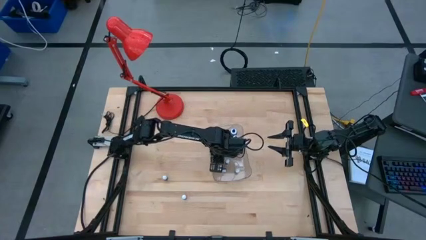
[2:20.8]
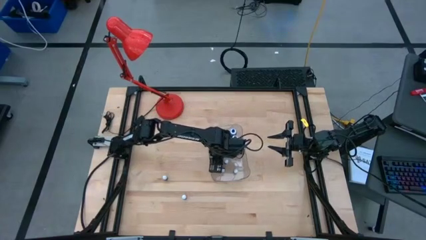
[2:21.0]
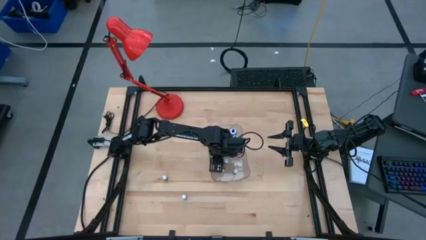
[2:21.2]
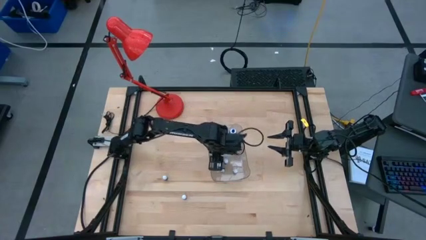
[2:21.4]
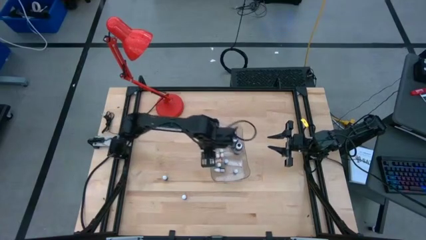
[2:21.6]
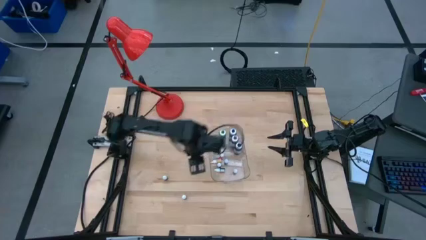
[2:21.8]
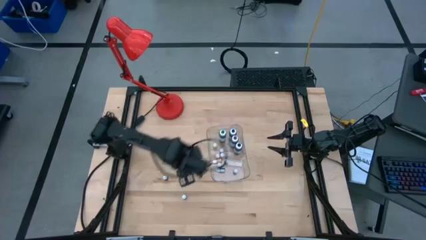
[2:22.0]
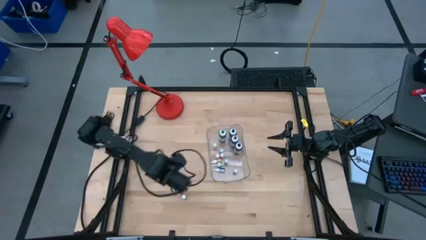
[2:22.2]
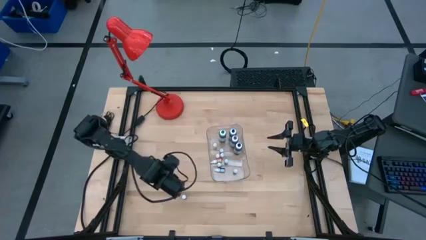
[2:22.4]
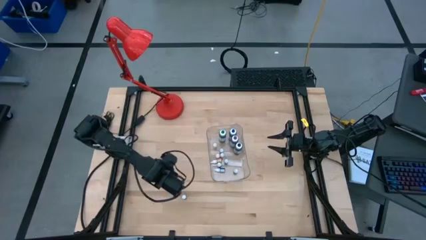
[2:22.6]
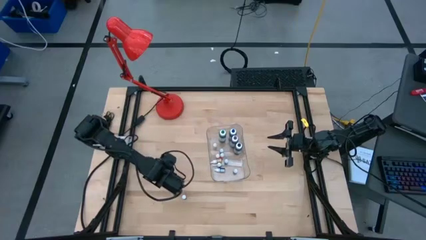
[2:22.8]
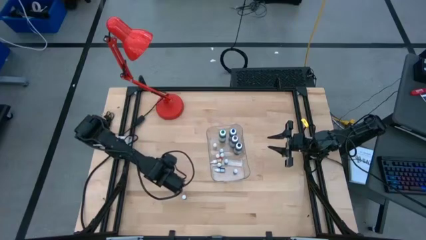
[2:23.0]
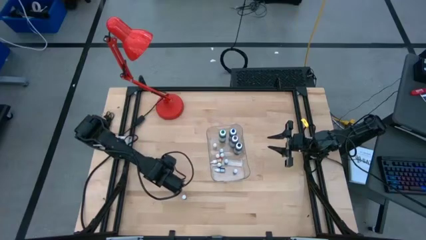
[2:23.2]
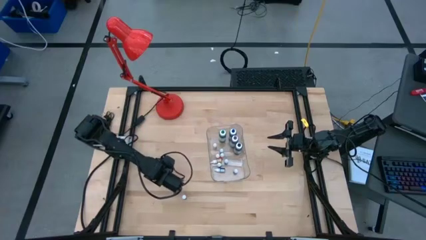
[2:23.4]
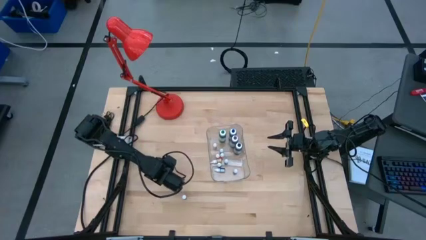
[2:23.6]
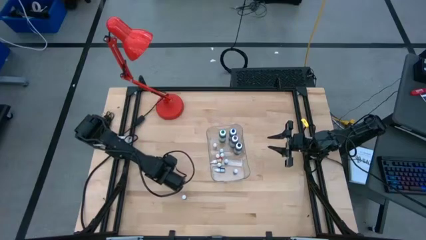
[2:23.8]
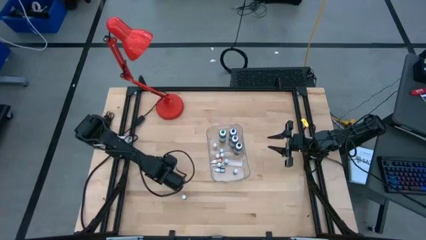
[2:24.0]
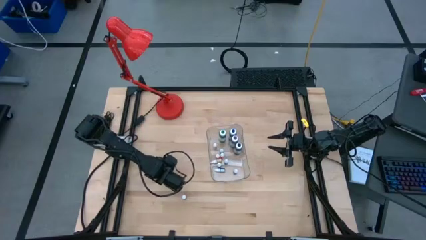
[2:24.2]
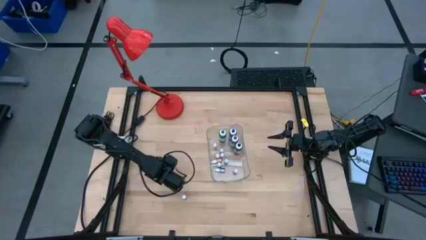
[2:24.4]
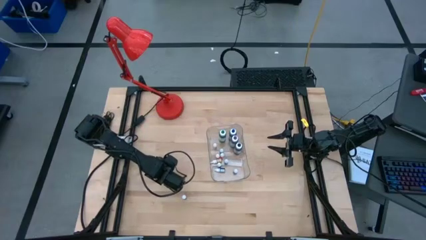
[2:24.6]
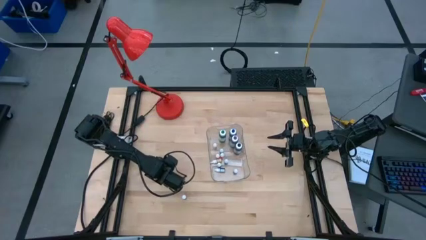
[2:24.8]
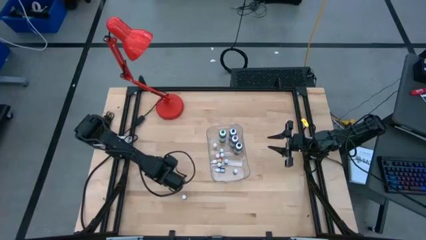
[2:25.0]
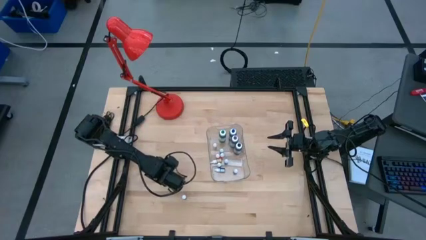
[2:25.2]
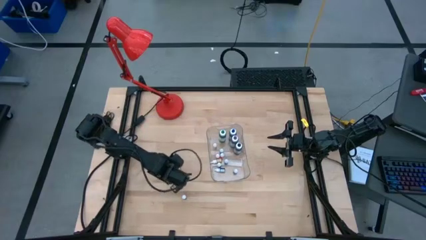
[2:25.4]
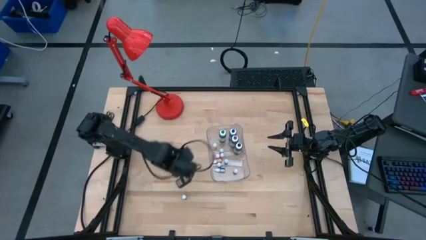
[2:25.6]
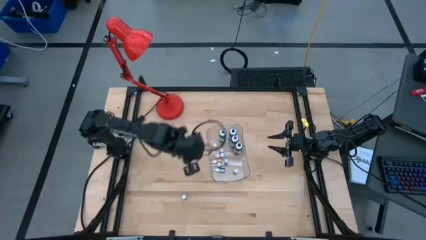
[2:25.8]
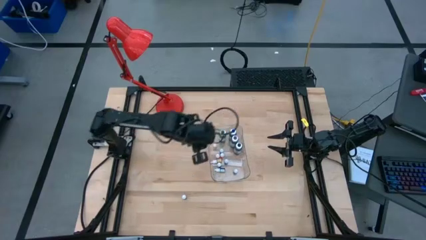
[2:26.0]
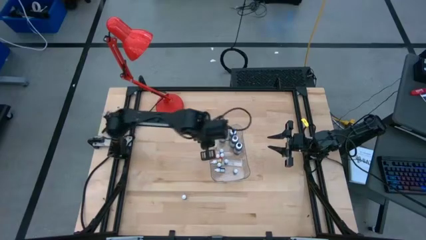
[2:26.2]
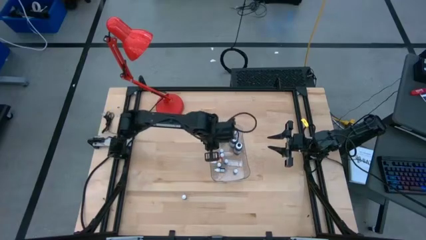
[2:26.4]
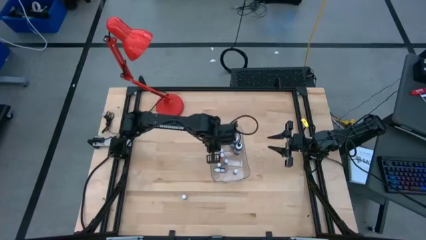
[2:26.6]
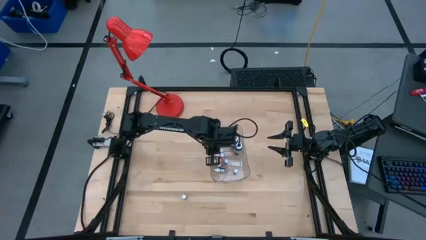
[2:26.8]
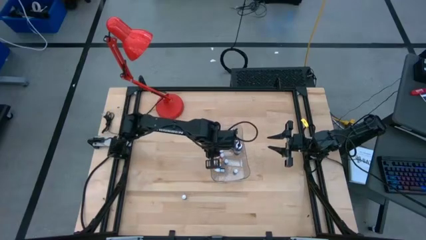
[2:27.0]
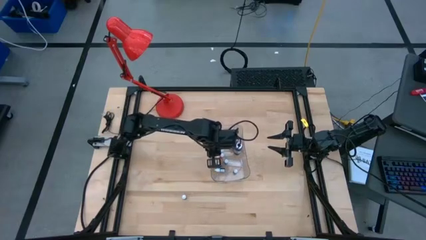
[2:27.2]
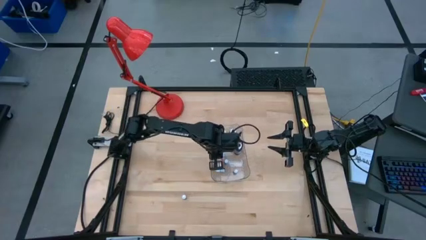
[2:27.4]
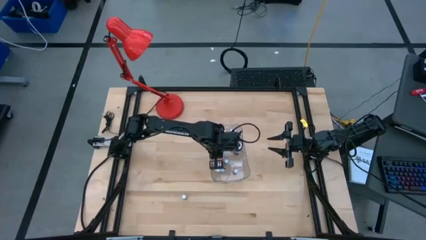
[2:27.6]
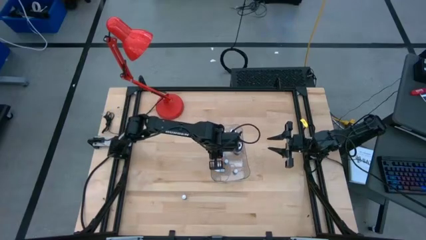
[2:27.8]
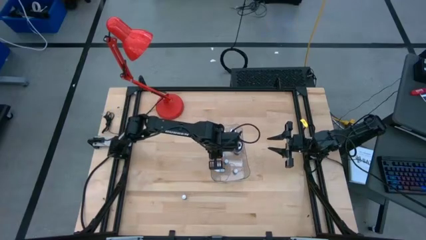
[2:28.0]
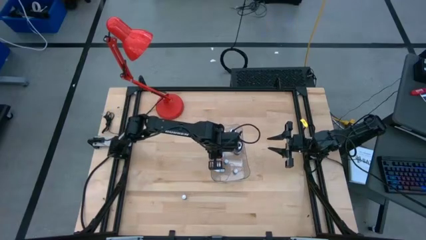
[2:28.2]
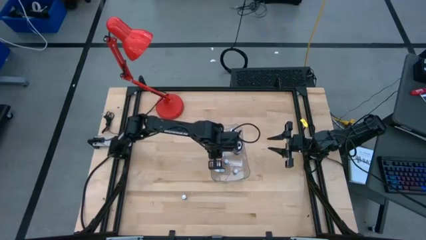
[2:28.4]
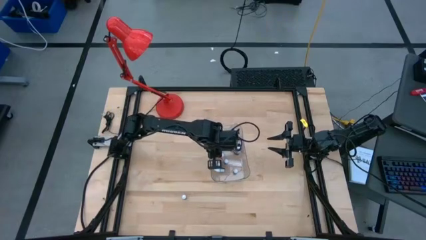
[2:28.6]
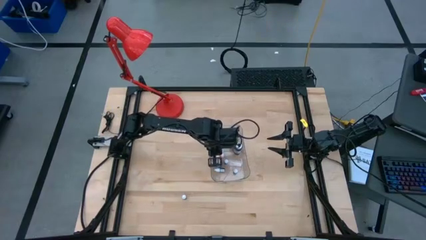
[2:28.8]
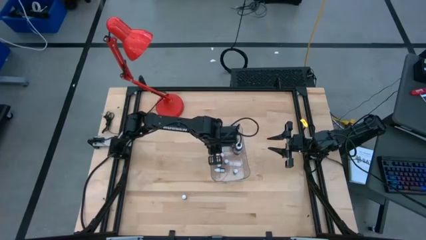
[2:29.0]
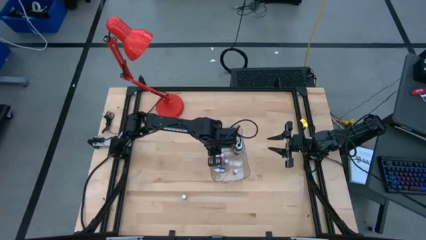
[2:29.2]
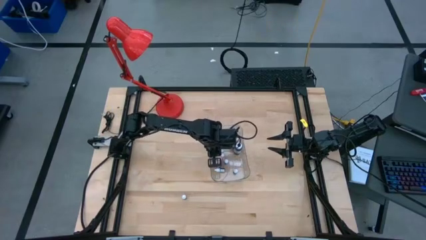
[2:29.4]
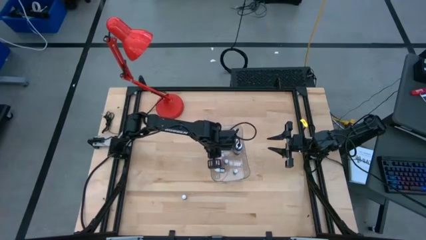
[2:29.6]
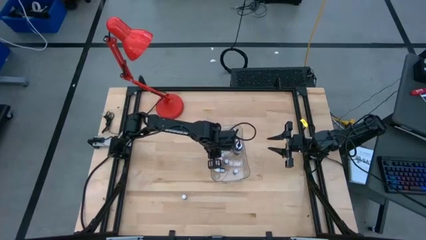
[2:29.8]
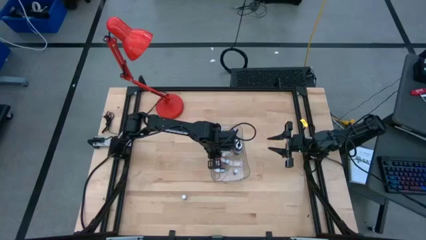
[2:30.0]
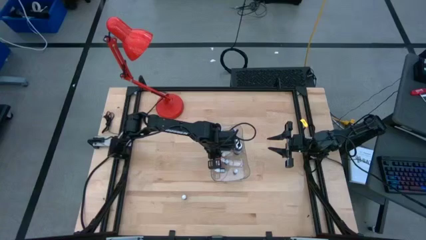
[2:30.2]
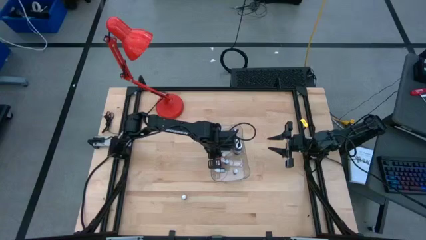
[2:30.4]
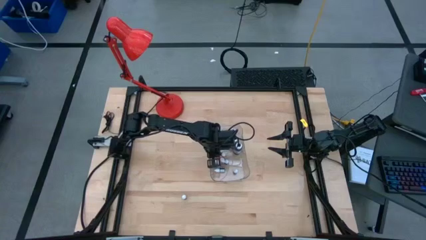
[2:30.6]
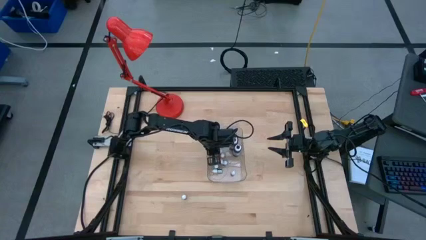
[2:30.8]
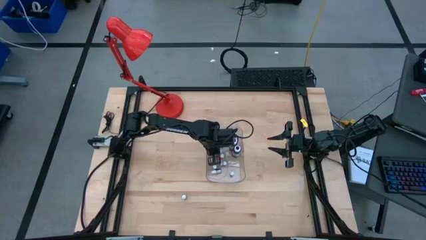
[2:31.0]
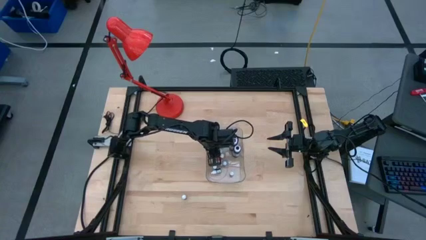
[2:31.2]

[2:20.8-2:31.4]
Task: Pick & Place food coloring
Put the blue food coloring bottle into the transparent container

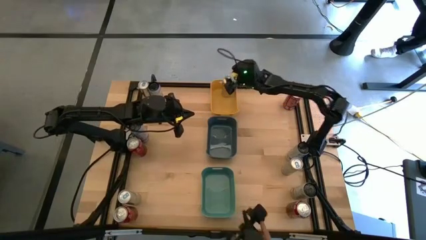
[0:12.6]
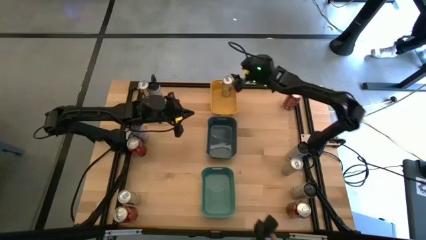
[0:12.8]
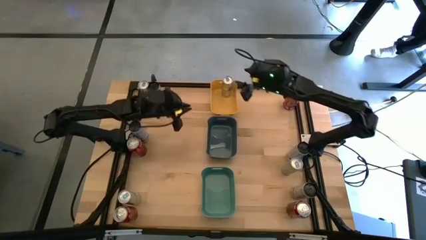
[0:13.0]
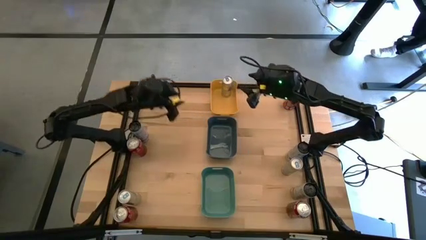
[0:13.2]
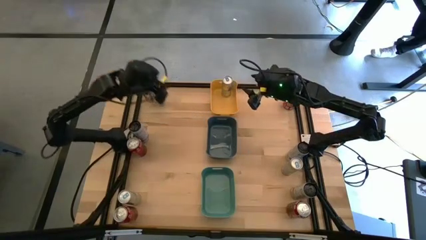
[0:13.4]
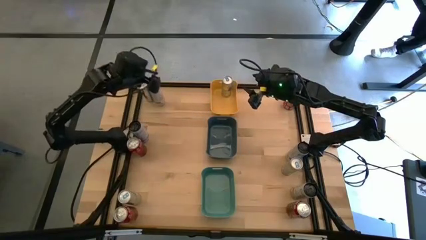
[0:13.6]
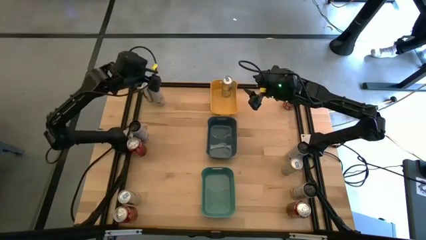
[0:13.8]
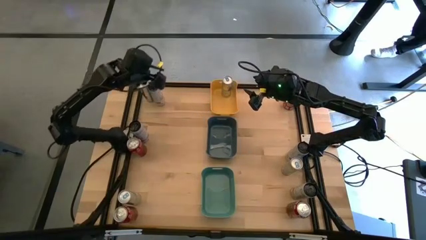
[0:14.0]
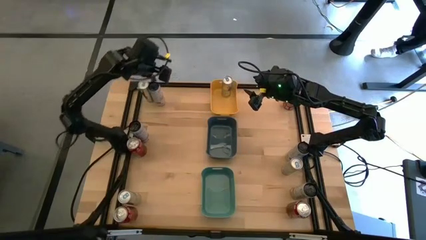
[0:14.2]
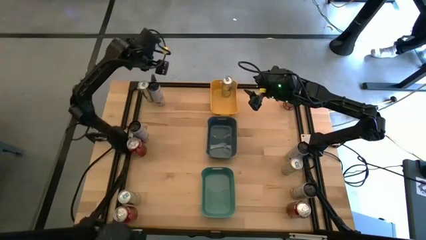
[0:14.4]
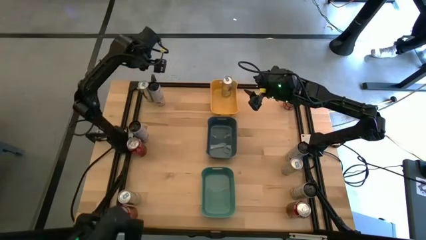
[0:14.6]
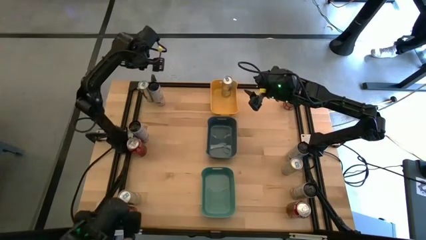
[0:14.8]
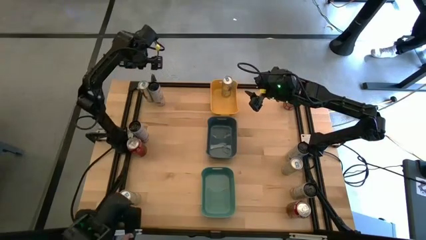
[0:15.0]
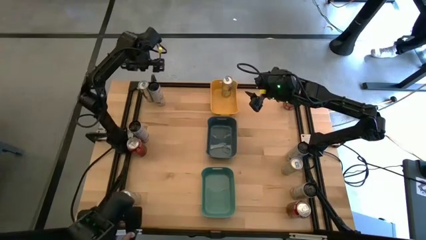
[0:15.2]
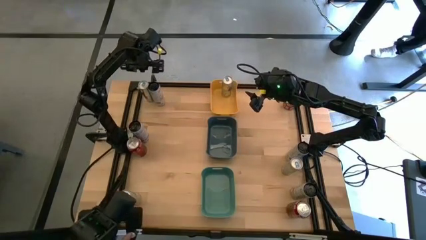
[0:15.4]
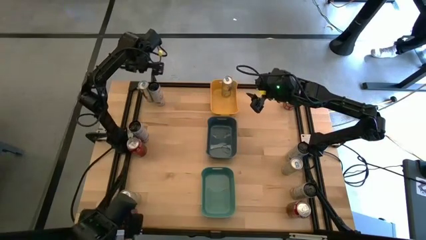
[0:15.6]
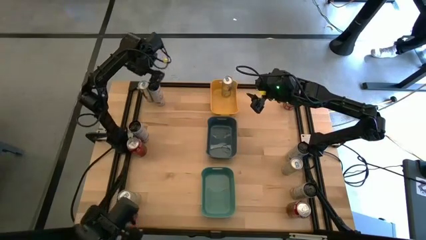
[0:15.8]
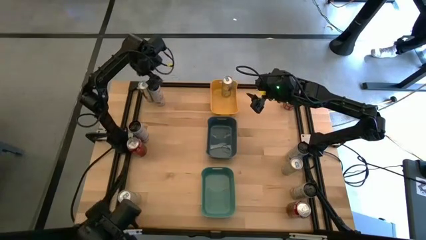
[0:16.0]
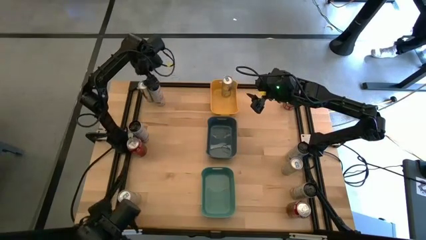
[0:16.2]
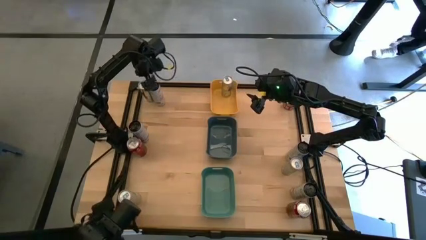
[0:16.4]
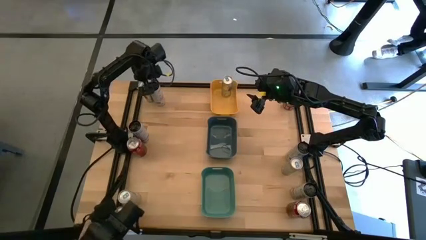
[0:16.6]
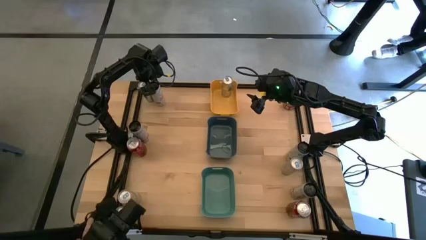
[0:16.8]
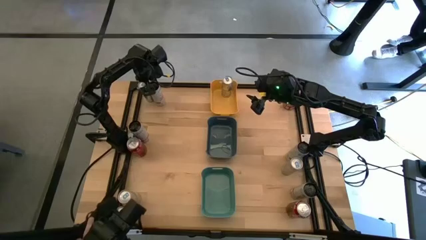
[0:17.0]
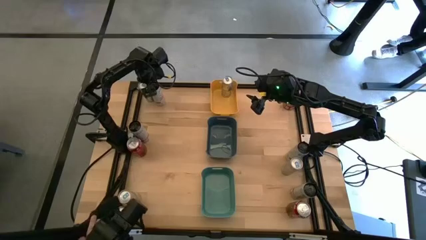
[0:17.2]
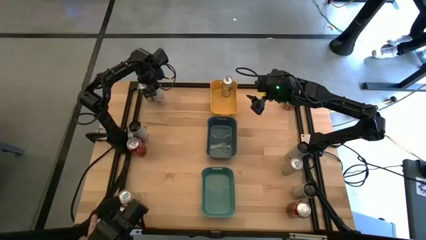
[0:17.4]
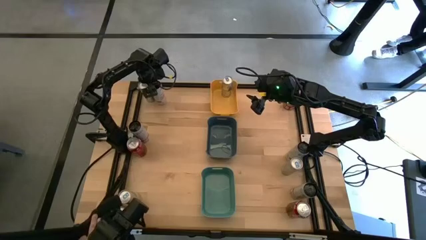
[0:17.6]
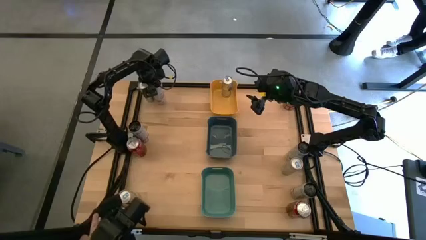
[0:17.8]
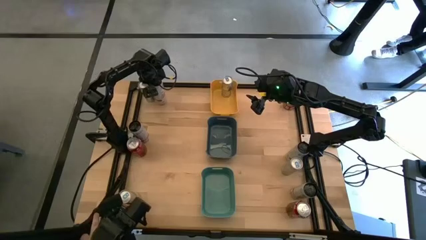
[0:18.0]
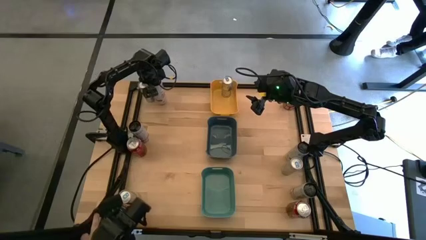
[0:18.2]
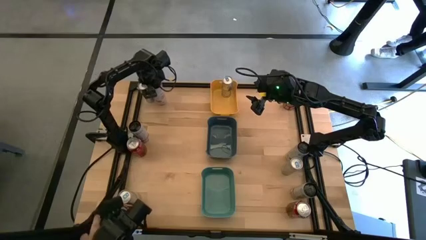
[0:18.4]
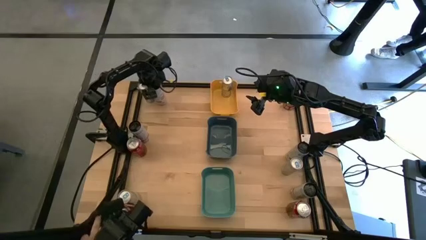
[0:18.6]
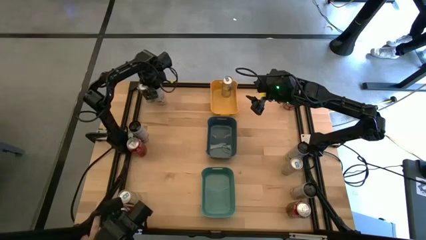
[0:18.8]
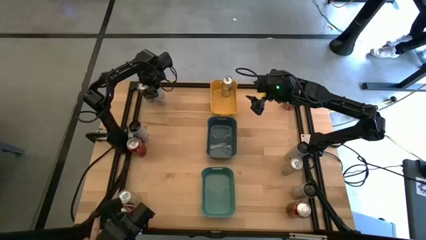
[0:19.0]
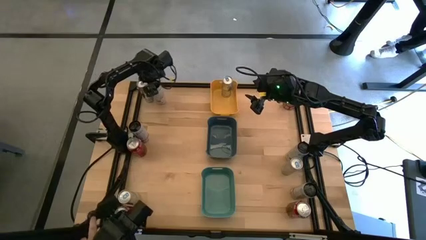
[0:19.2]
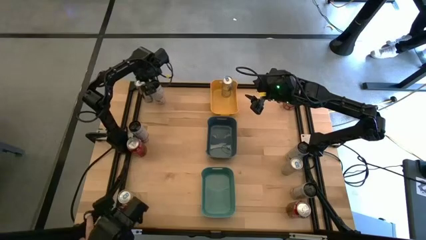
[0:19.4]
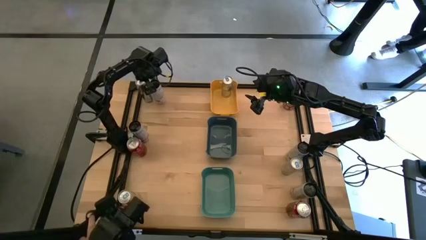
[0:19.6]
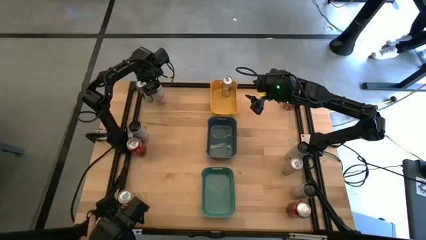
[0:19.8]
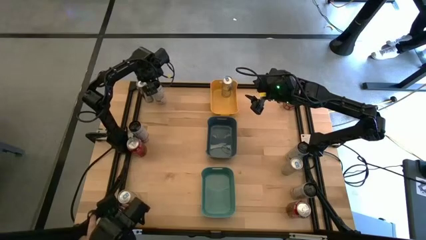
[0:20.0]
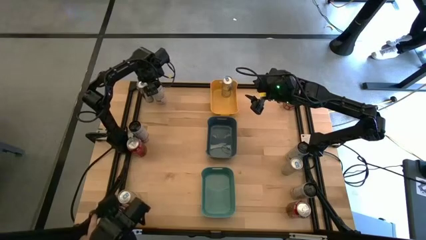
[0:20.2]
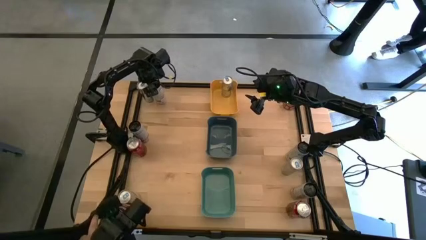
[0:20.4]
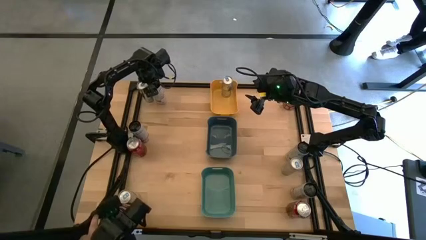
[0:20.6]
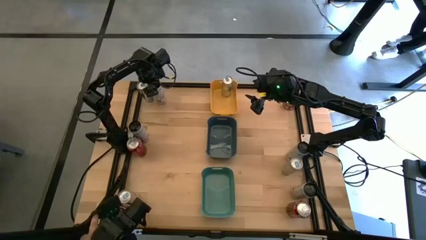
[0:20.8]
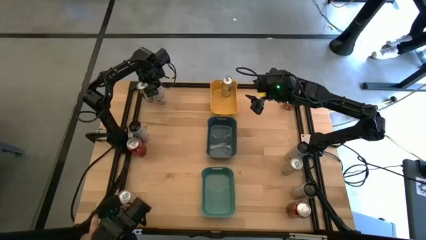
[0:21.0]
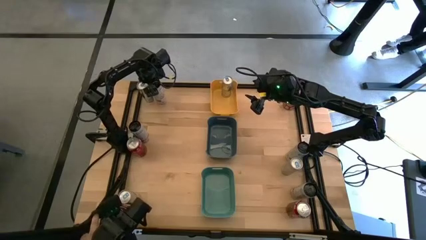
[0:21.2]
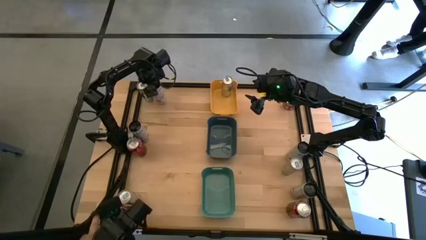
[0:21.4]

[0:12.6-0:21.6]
Task: Sort soda cans
Put the top blue soda can into the yellow bin
